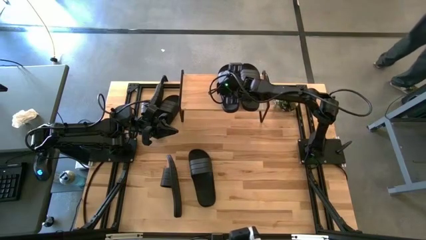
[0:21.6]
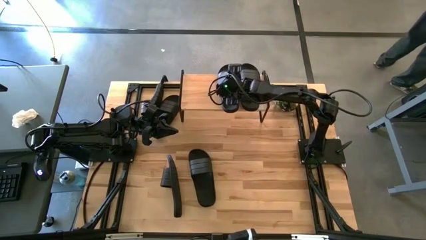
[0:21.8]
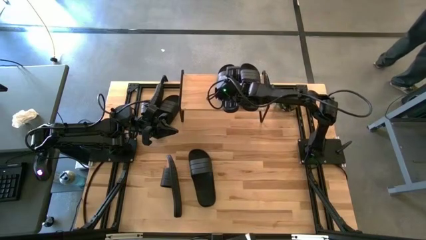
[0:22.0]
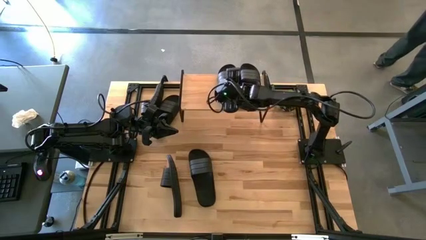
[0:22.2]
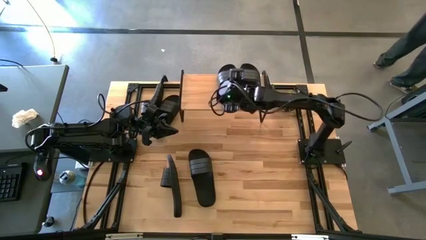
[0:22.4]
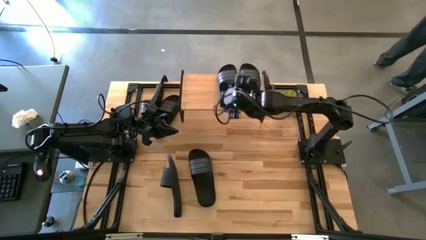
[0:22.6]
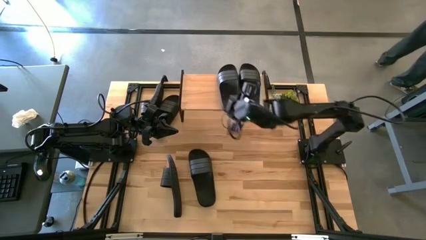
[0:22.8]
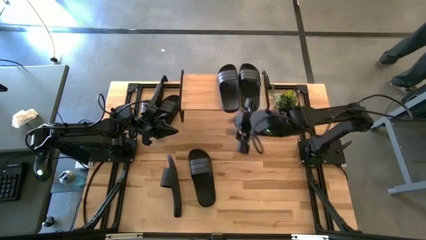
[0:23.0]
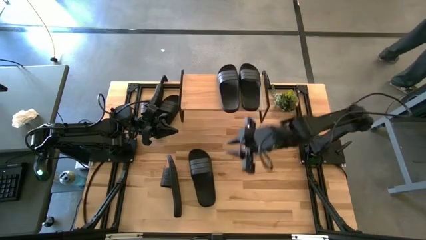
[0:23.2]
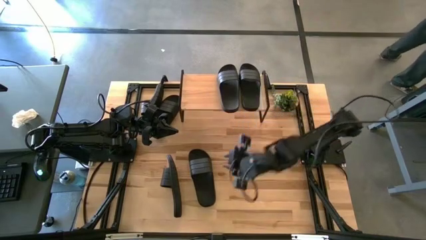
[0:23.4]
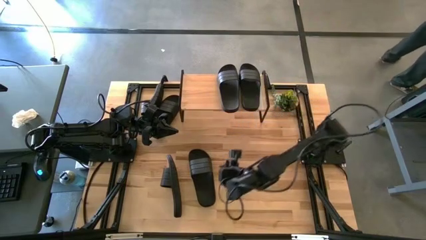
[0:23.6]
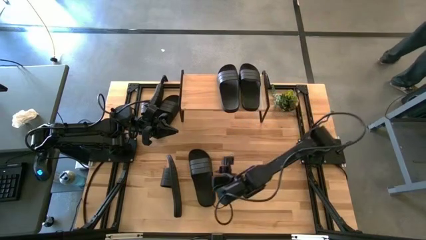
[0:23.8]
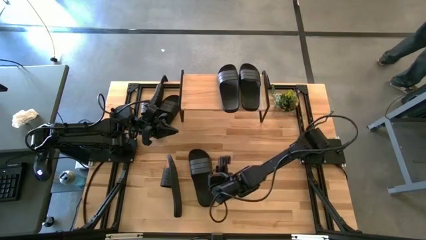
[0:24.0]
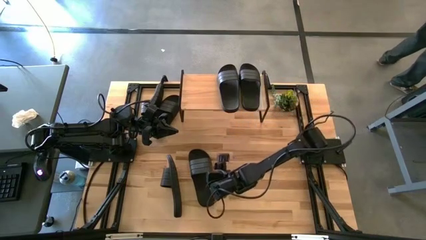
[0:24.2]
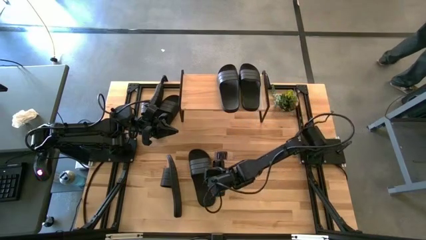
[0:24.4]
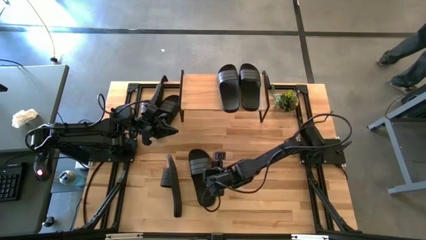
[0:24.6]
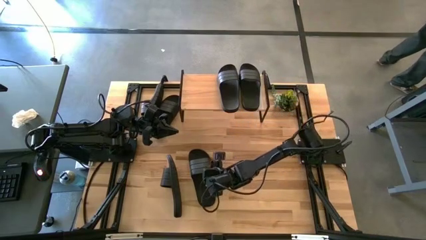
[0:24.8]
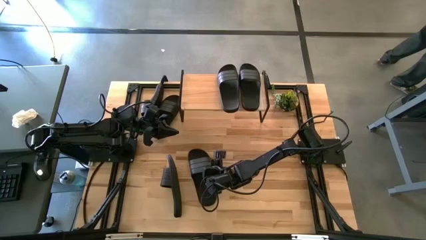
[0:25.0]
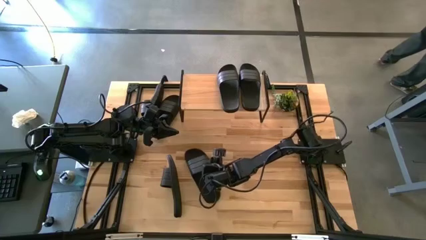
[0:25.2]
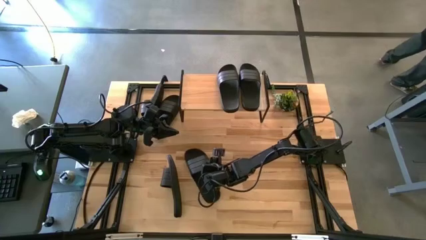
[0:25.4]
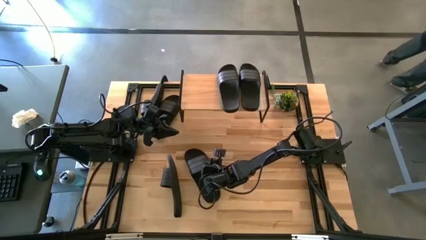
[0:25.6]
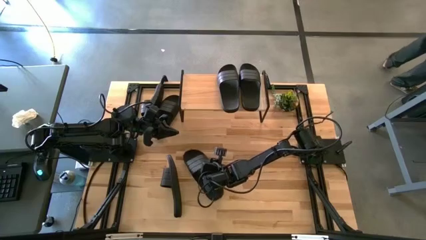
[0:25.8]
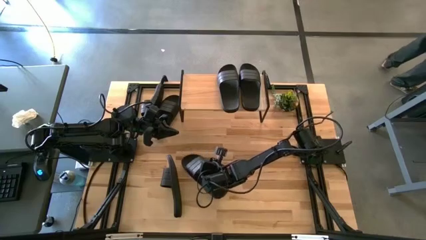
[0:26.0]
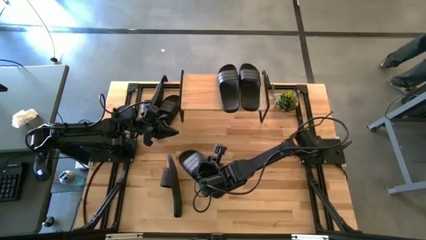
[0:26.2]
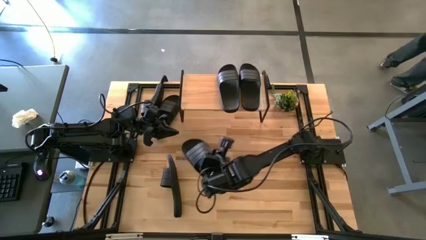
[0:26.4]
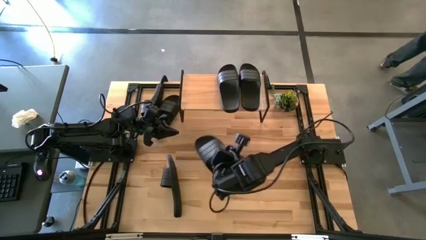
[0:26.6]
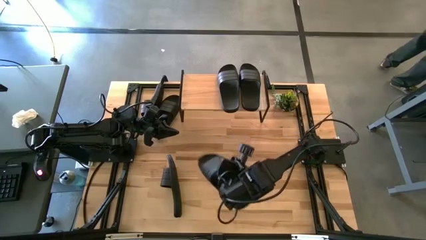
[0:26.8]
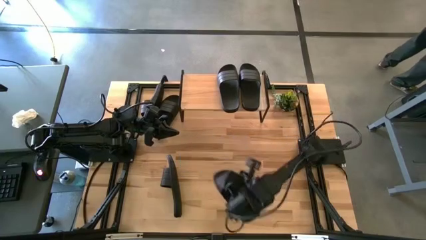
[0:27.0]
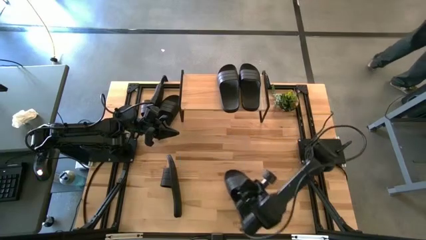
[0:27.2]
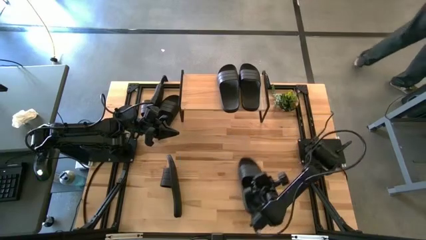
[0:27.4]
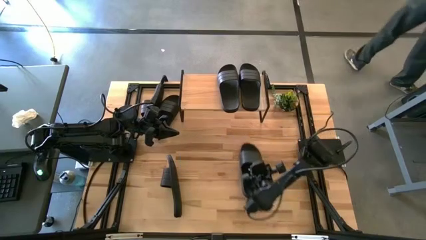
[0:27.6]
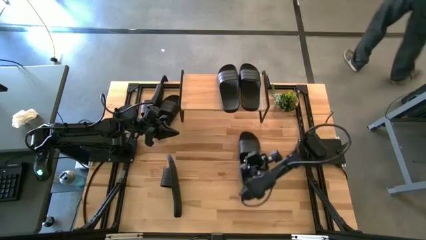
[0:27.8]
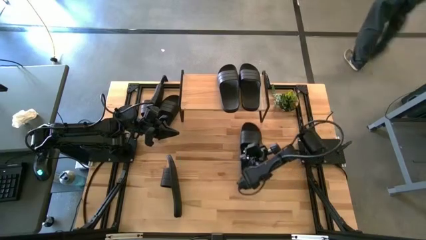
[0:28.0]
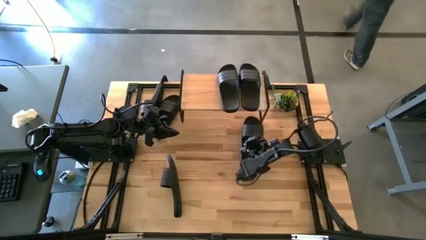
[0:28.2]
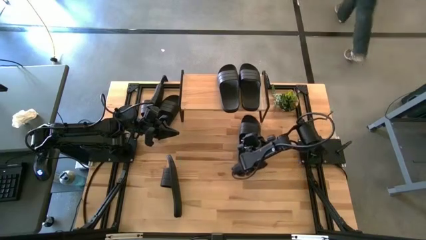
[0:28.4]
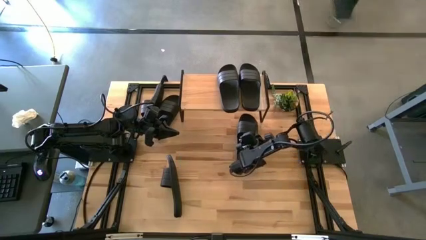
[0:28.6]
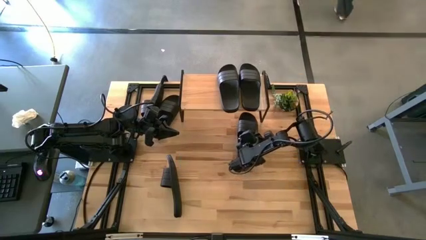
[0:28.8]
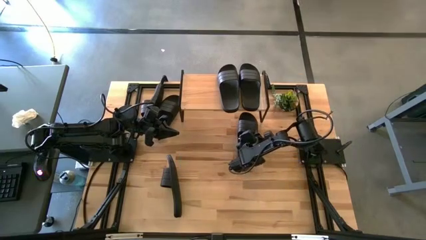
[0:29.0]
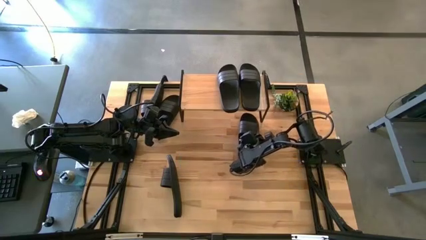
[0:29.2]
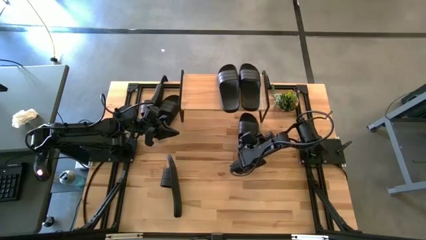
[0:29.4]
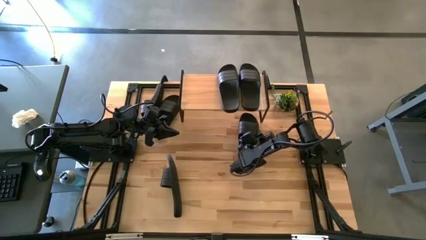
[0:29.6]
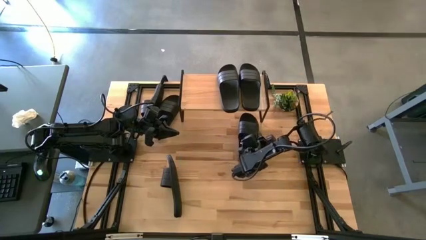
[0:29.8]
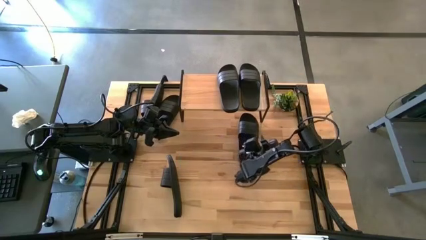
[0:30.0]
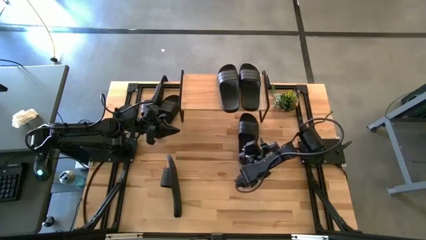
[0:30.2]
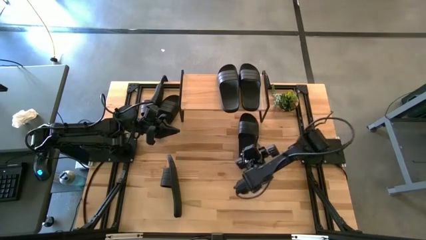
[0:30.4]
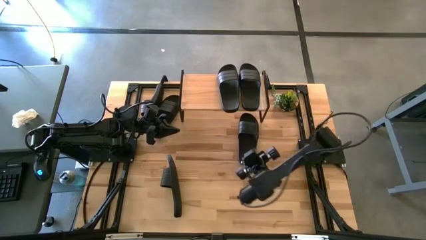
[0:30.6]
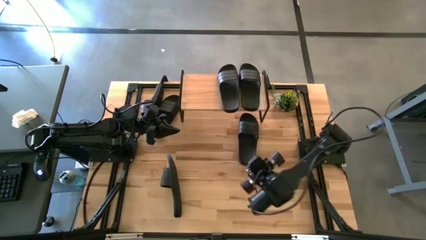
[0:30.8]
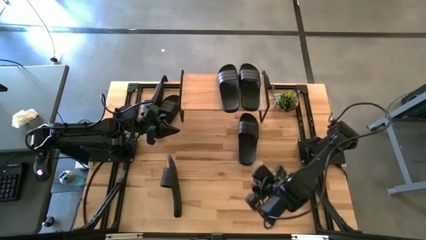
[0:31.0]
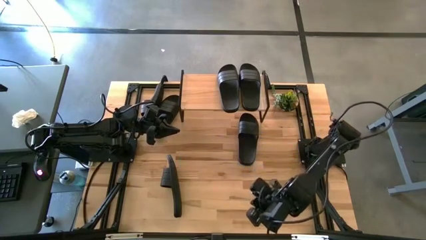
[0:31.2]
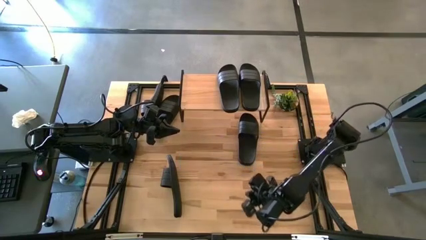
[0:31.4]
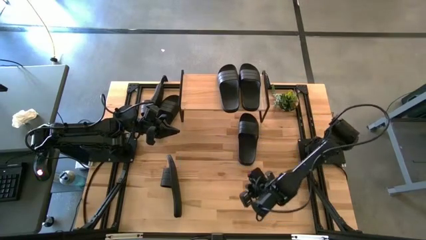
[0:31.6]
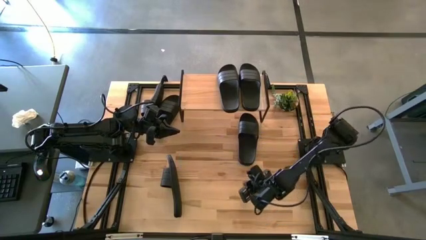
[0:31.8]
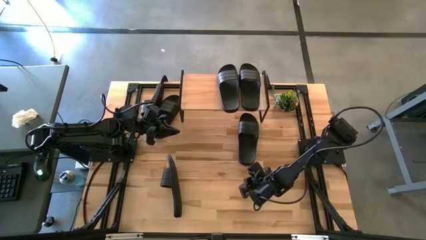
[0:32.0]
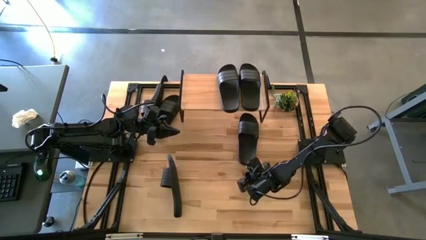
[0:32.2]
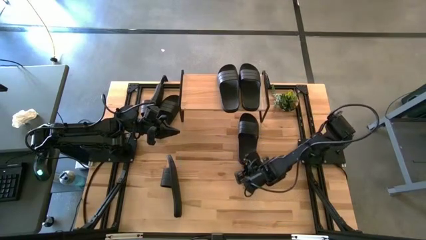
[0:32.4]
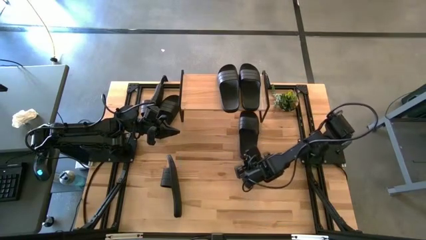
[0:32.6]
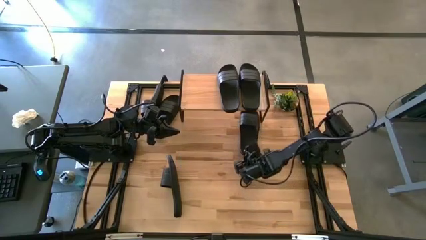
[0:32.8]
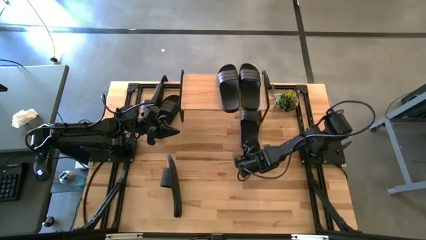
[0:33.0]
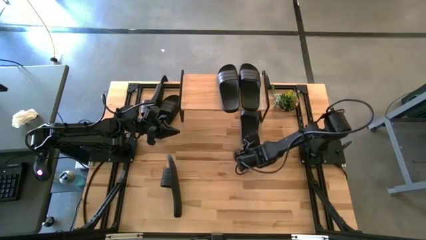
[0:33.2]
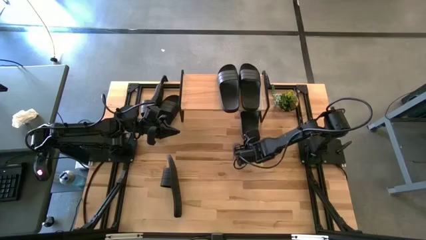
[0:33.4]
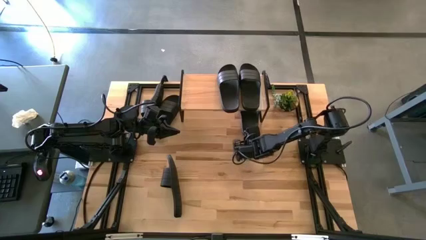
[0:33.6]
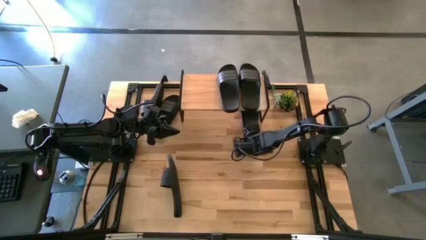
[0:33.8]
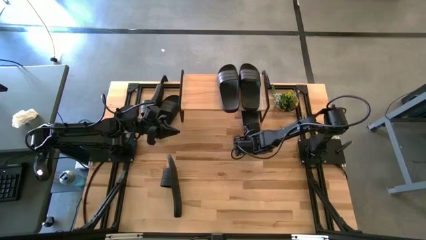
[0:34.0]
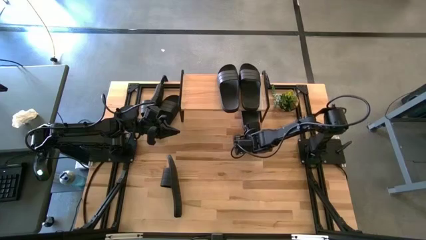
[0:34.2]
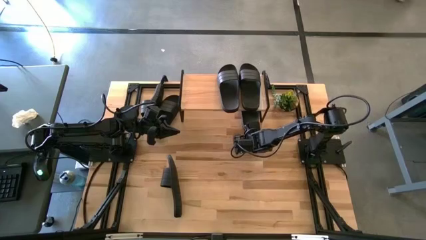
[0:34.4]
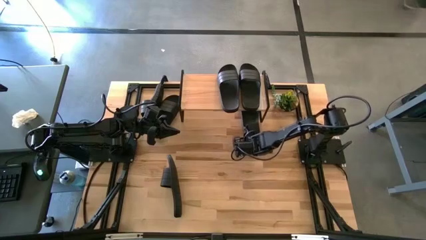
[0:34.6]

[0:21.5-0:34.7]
Task: Pick and place slides into the shelf
Put the black slipper under the shelf
